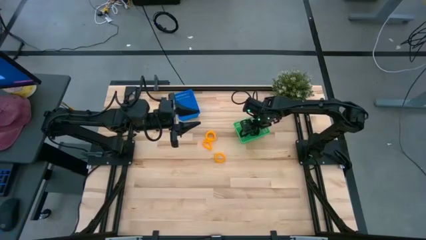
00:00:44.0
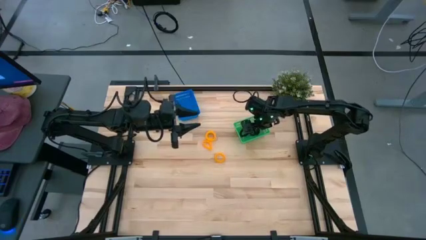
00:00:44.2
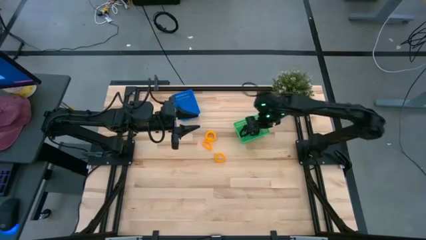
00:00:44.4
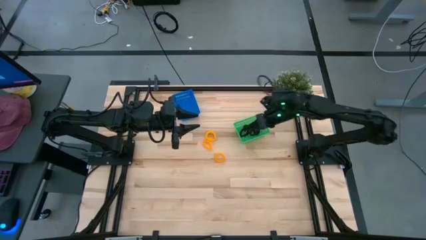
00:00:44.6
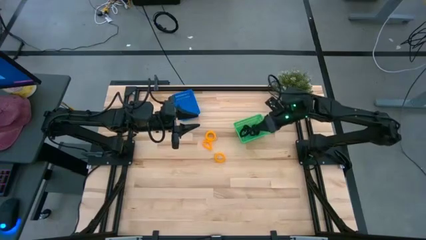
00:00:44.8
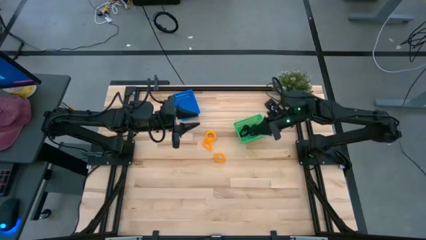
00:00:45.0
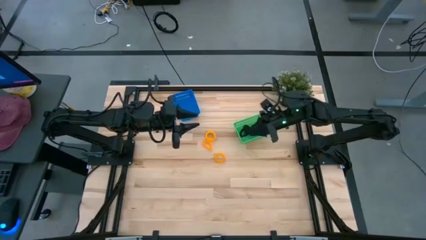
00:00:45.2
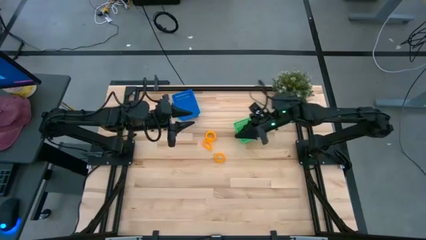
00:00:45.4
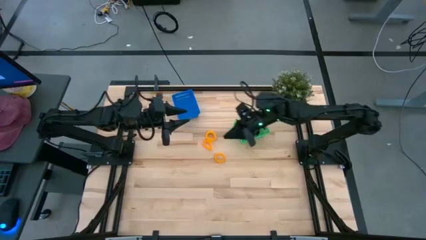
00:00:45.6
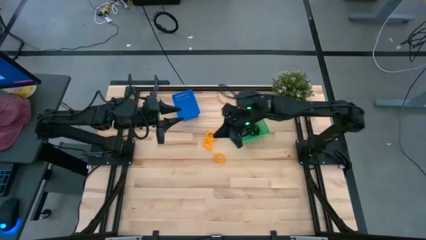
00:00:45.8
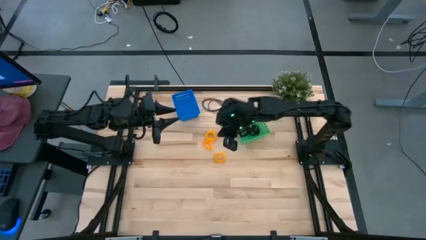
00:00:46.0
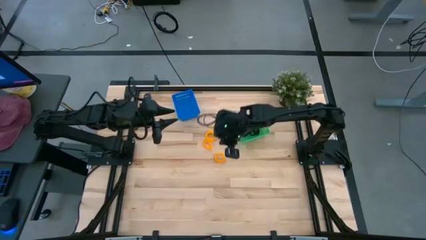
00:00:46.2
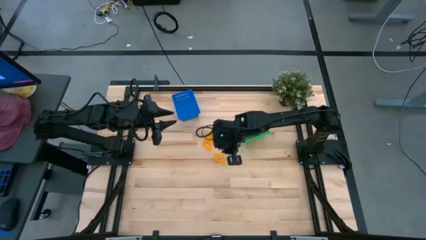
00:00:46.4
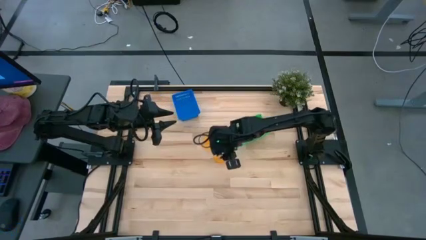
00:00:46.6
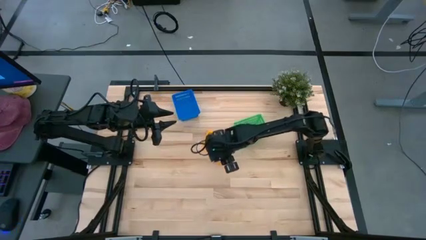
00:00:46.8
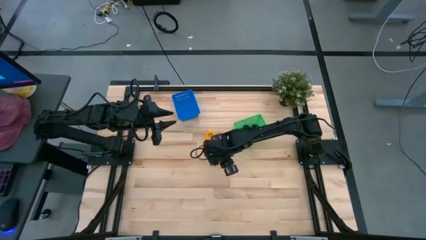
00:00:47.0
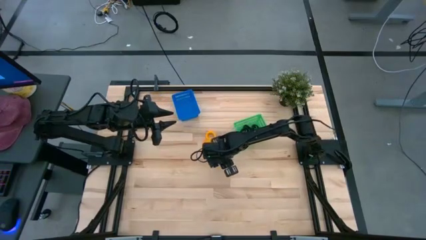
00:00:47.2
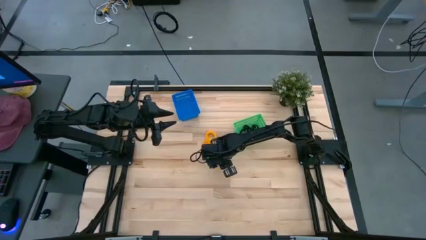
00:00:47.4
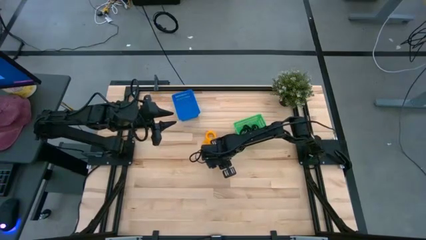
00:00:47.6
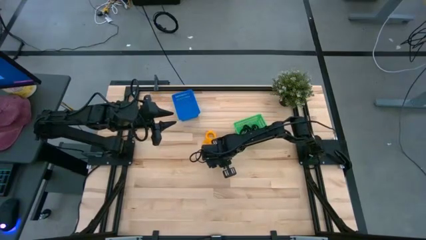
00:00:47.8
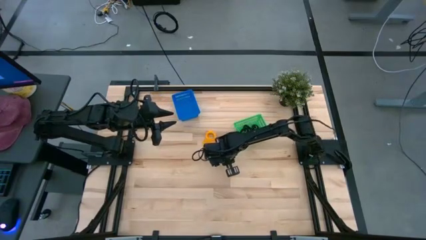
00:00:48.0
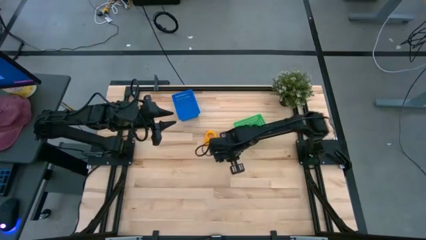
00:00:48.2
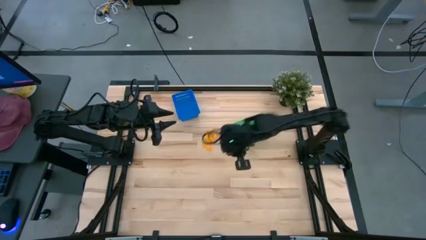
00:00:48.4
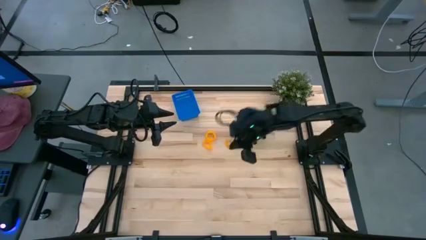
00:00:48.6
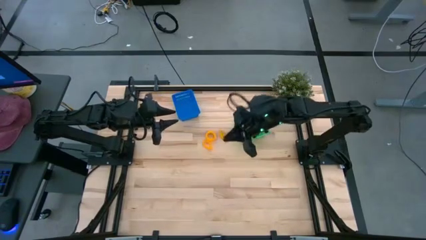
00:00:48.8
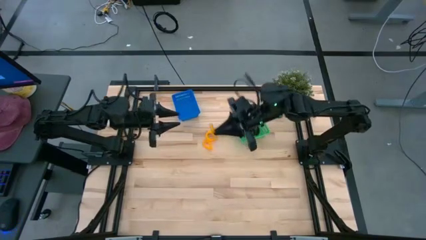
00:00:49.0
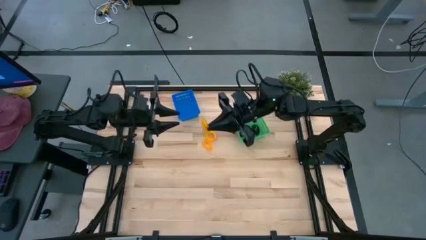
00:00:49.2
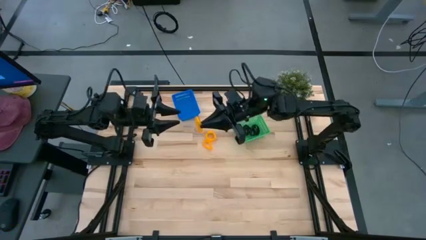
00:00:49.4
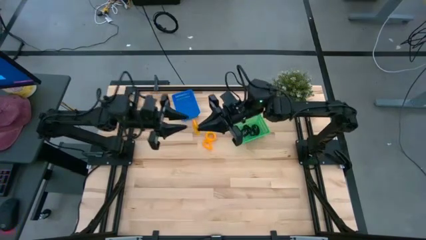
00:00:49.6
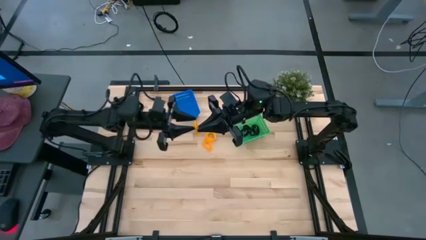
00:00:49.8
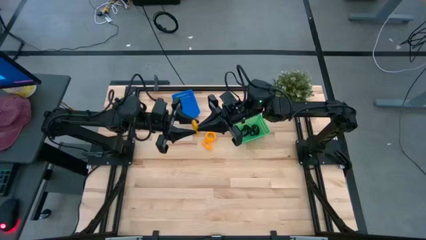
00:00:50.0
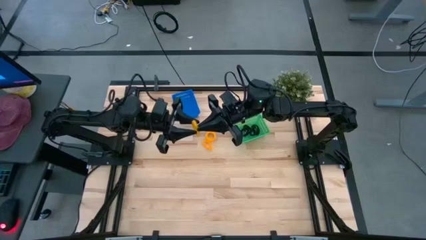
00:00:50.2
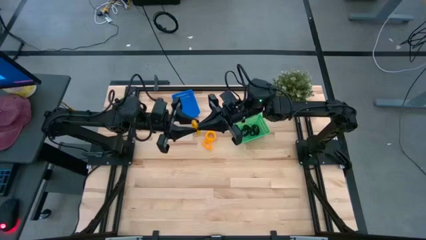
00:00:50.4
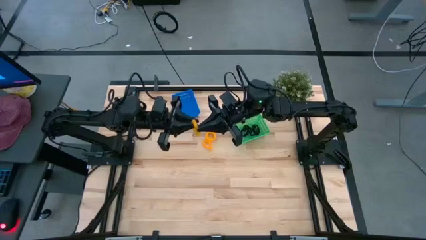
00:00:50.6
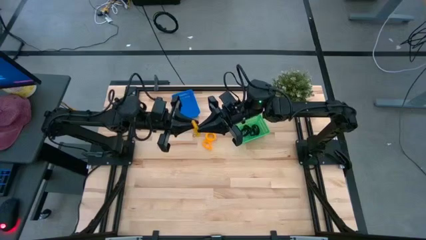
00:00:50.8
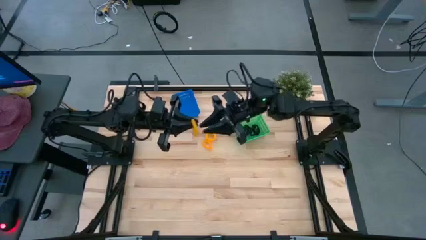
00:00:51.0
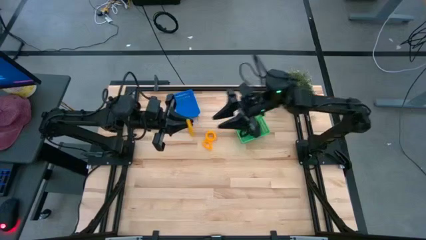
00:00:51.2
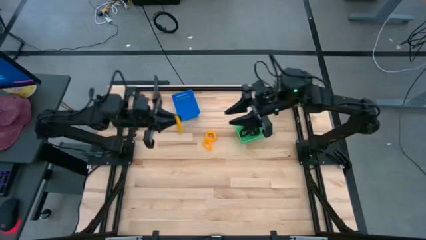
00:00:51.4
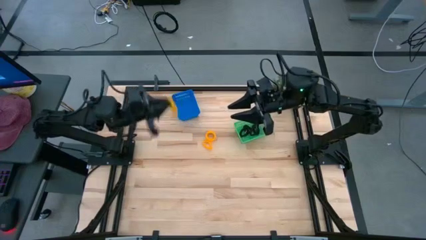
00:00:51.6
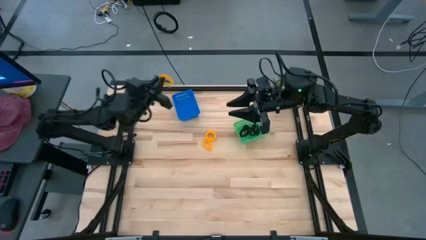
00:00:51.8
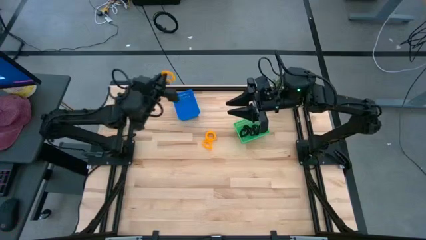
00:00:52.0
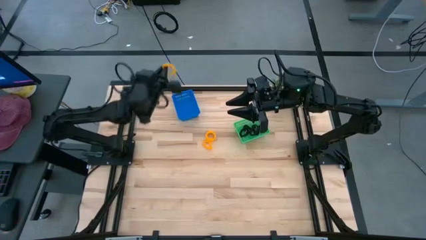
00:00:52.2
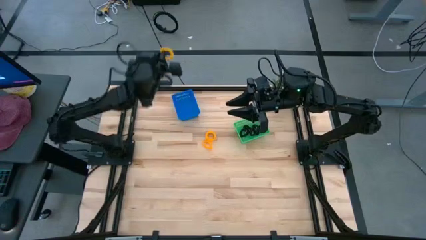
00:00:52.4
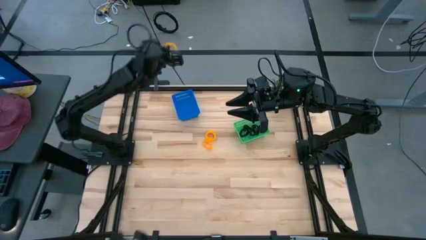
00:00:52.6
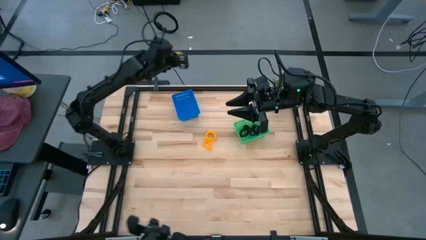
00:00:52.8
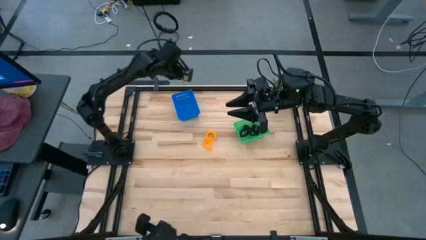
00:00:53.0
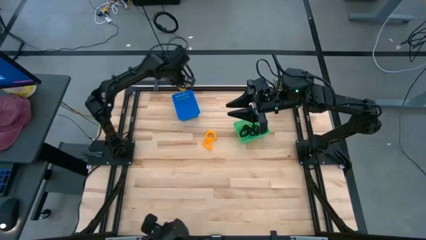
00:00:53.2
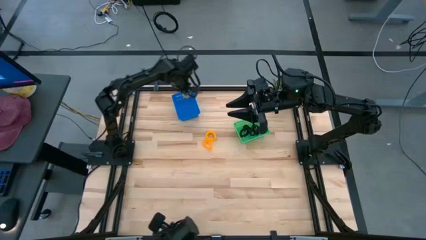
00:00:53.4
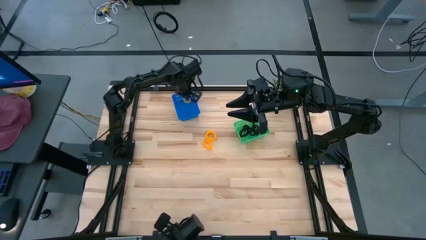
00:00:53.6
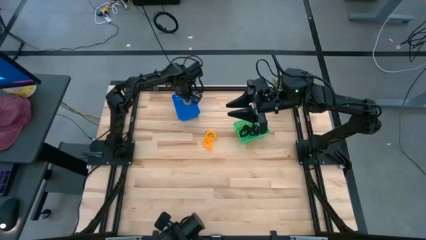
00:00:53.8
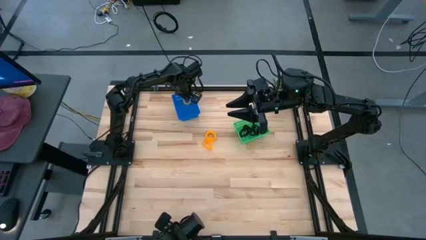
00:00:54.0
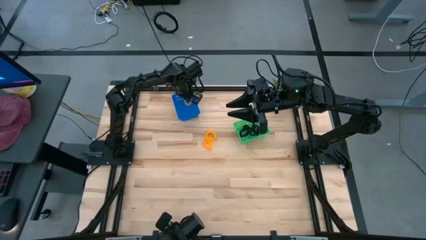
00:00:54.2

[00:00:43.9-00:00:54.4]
Task: Sort spring keychains
Put the yellow spring keychain into the blue bin
